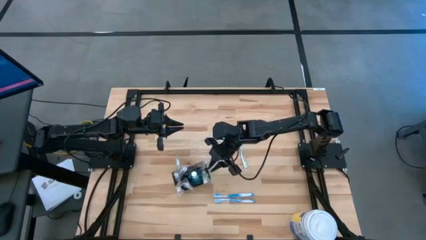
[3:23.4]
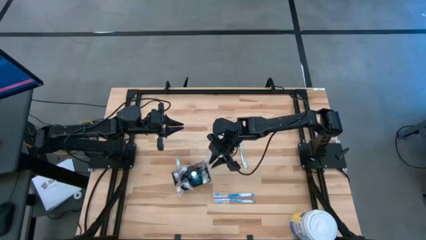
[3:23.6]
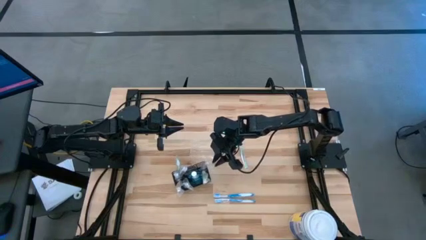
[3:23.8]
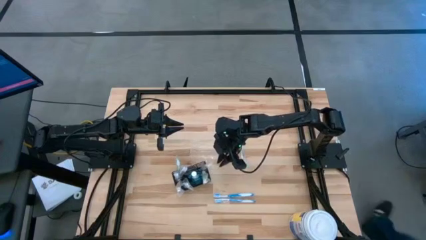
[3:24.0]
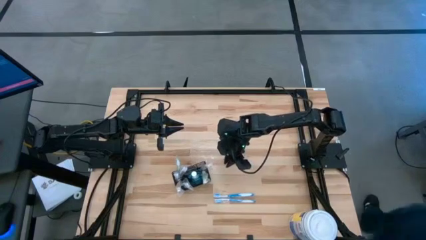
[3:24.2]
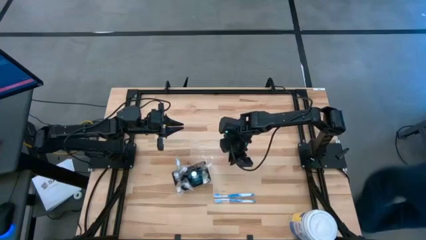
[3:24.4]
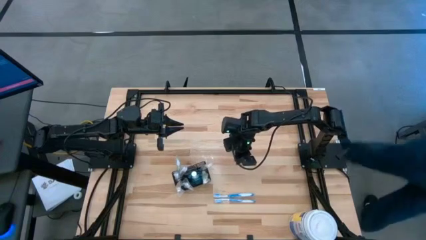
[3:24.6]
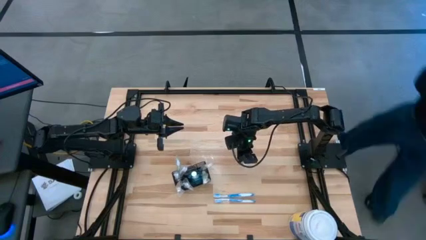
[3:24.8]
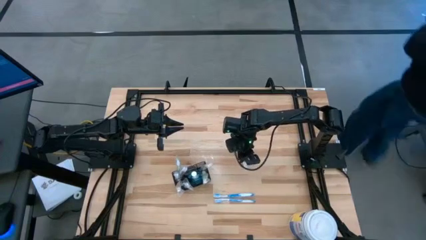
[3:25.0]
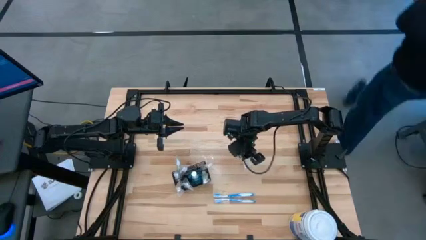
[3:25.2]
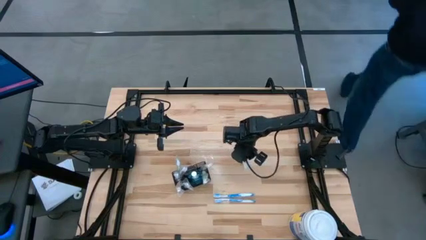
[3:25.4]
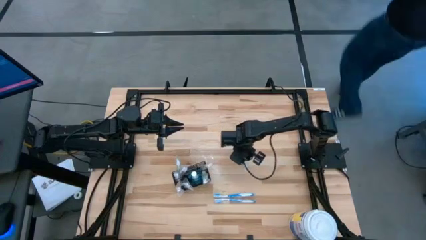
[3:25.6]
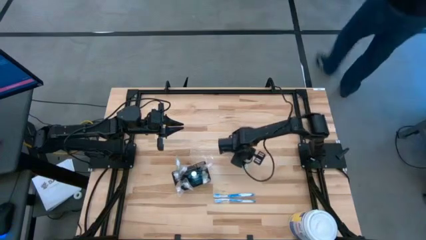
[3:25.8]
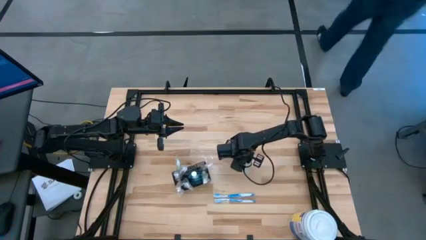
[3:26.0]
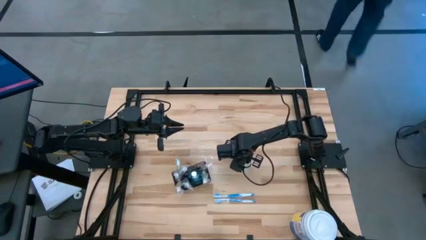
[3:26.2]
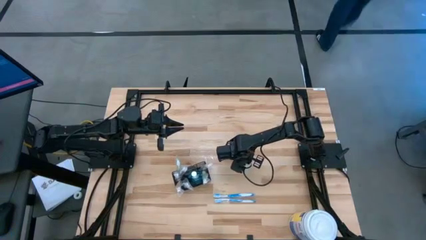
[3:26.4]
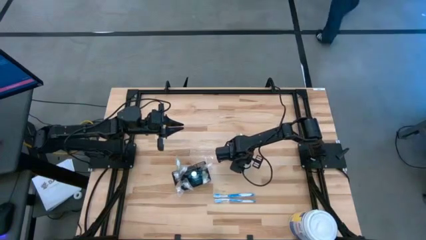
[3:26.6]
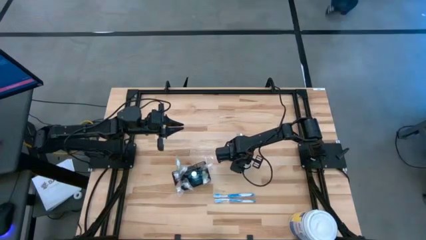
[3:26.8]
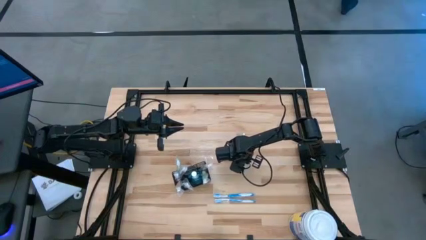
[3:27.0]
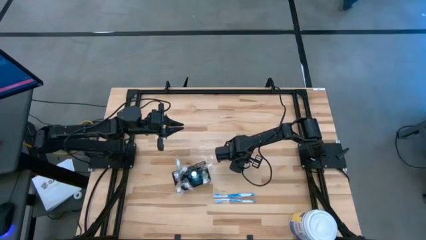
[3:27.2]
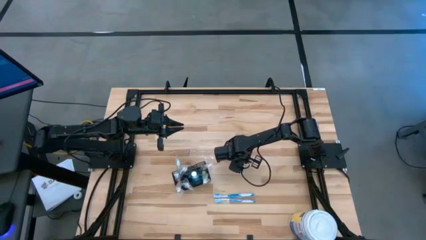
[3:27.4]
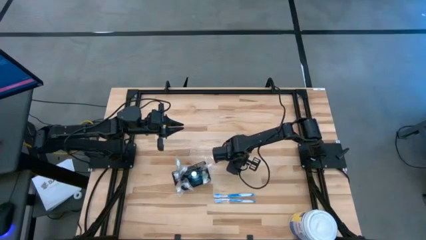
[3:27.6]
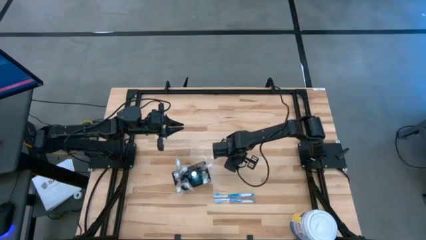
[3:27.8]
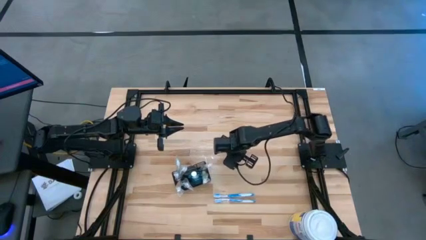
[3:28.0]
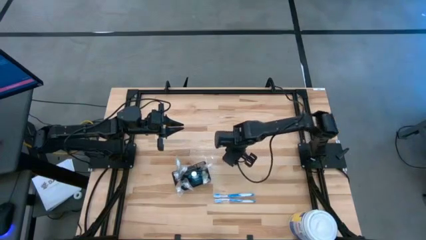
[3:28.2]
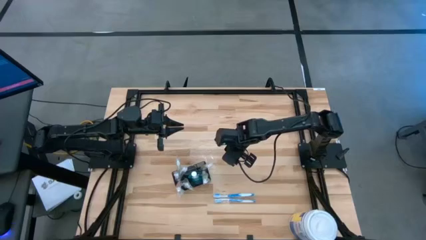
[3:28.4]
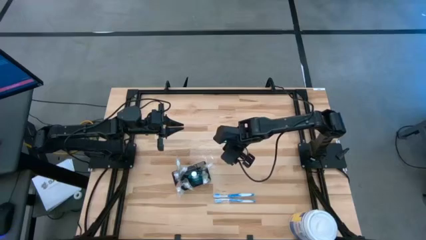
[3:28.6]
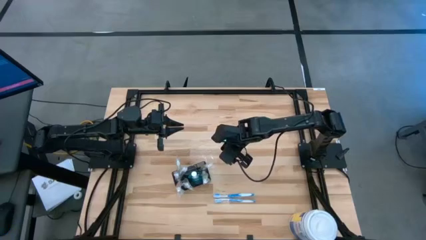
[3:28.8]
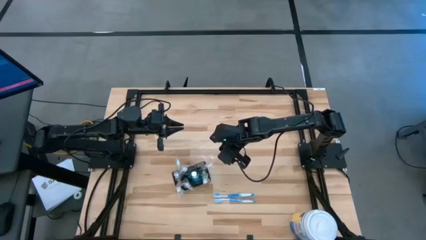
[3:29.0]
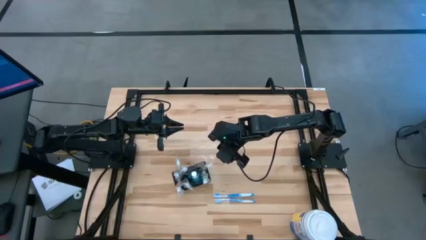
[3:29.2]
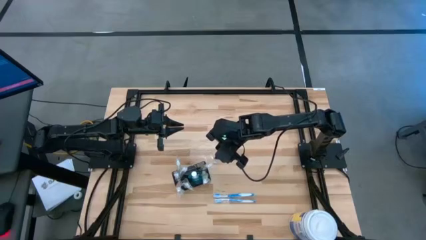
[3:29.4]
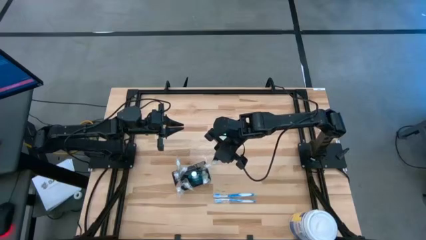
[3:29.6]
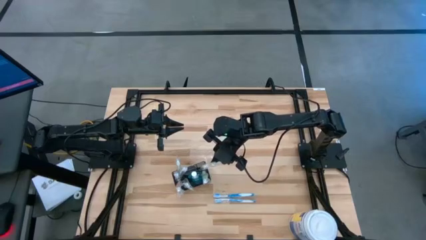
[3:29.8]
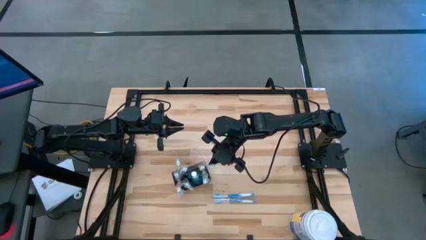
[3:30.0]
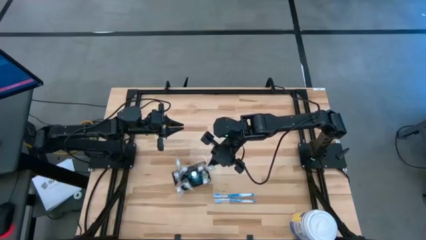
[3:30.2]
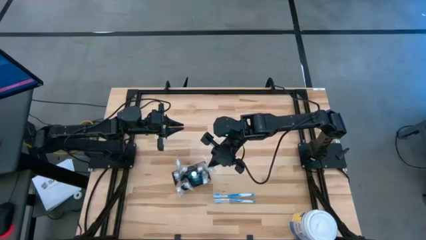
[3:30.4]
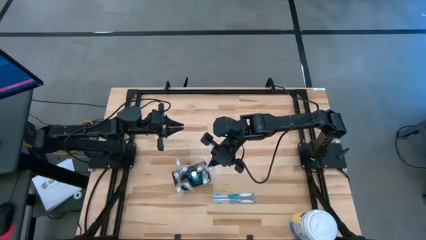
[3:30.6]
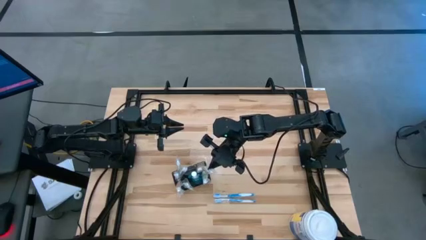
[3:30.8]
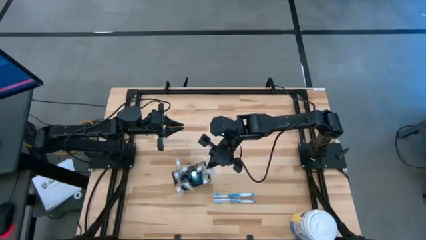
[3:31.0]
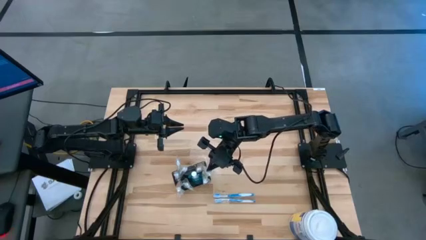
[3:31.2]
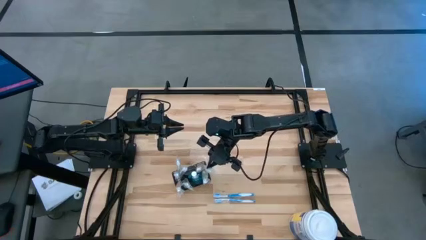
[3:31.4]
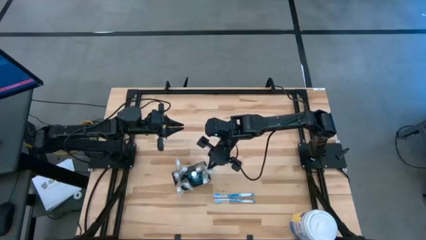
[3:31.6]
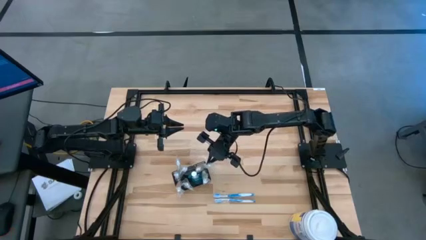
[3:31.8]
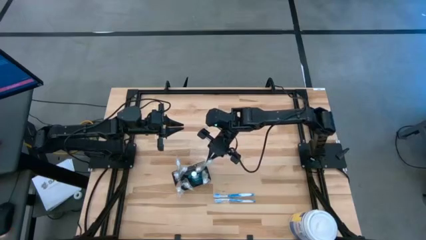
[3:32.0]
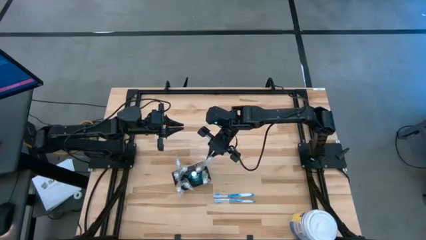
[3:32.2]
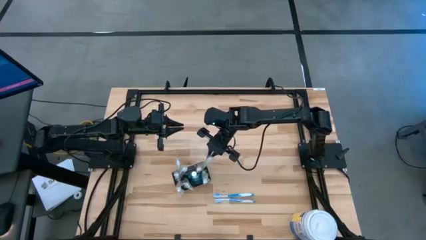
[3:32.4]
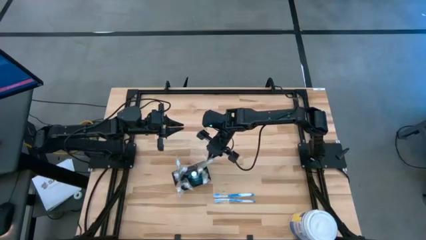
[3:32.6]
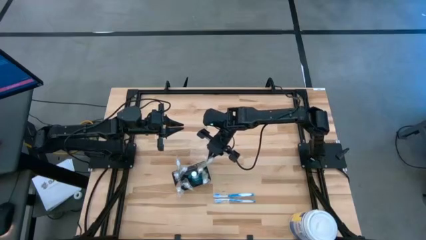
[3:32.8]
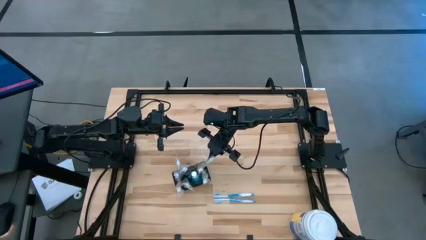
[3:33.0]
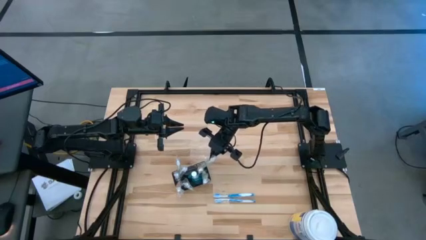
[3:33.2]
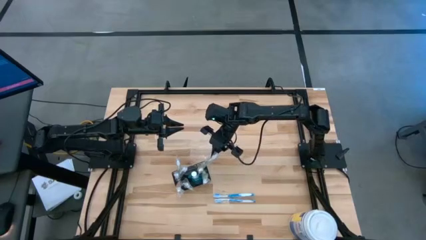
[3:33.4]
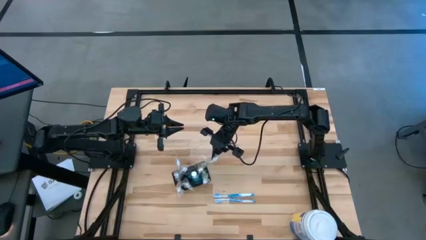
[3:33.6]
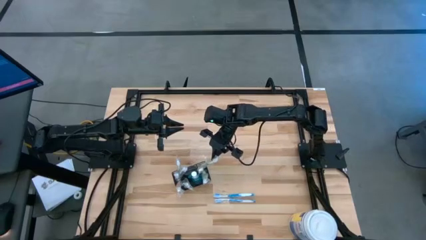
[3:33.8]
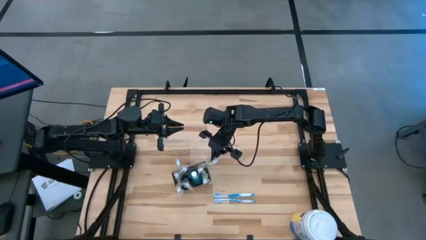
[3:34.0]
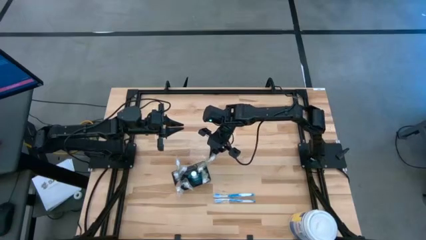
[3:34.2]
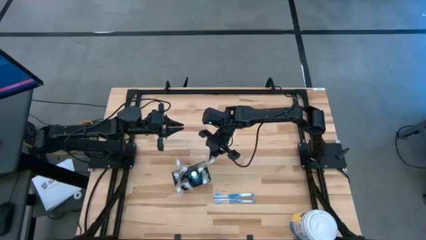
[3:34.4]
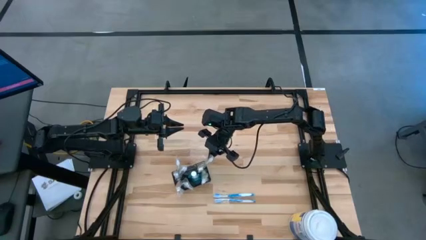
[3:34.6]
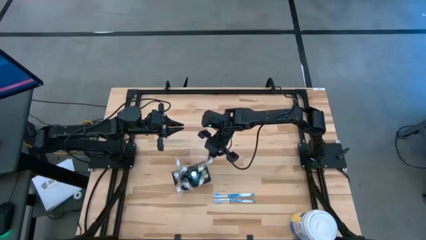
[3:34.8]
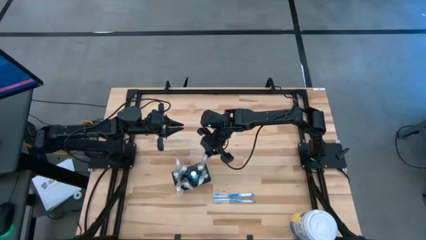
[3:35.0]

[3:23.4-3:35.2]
Task: Pick & Place toothbrushing station
Put the white green toothbrush into the black toothbrush rack

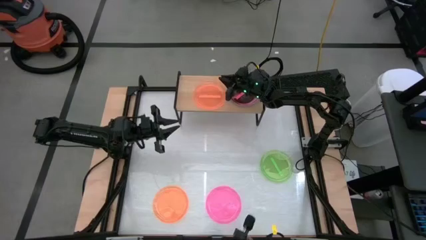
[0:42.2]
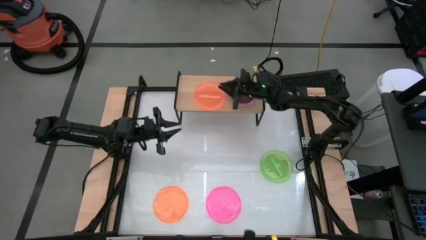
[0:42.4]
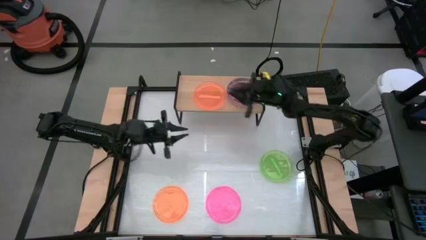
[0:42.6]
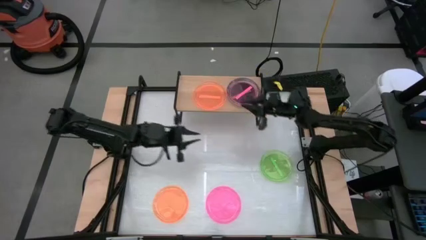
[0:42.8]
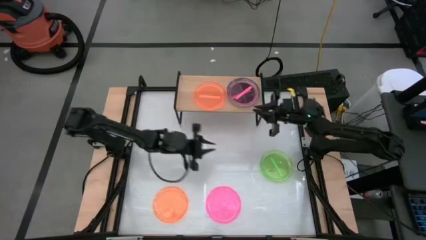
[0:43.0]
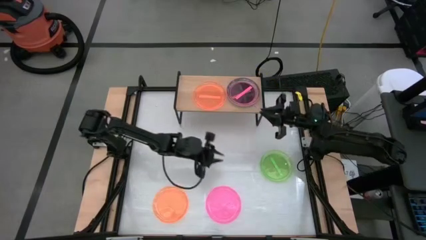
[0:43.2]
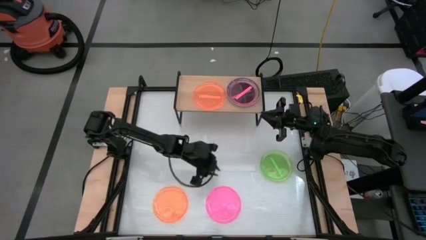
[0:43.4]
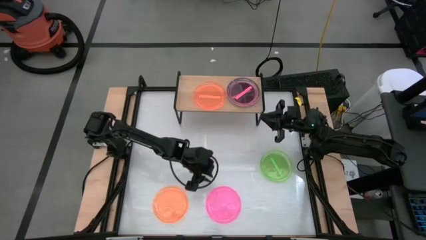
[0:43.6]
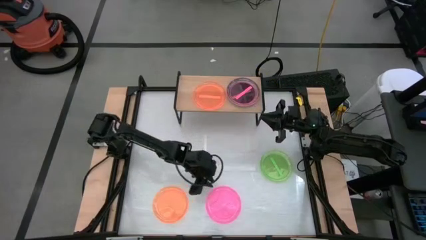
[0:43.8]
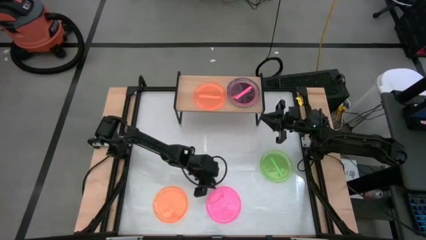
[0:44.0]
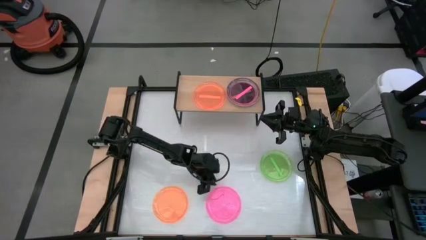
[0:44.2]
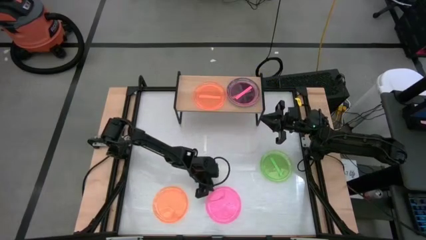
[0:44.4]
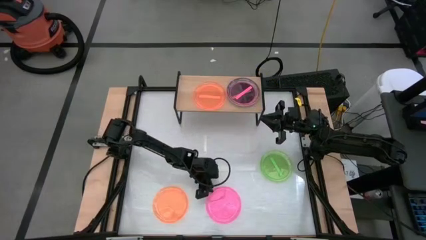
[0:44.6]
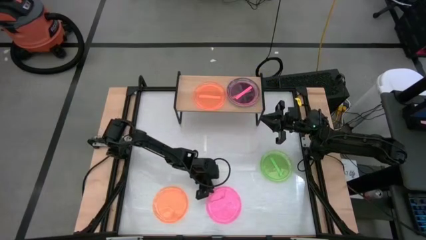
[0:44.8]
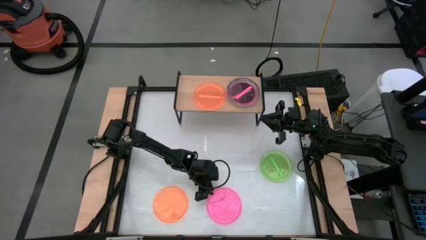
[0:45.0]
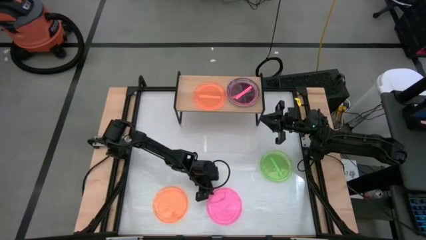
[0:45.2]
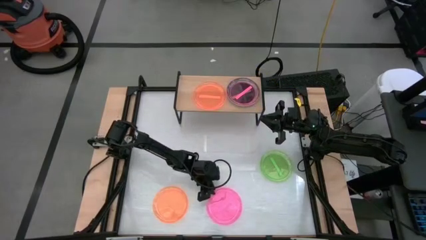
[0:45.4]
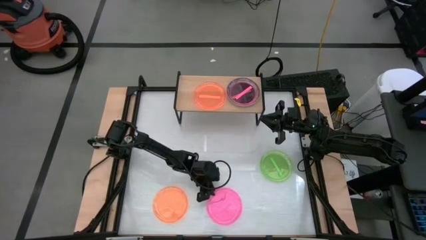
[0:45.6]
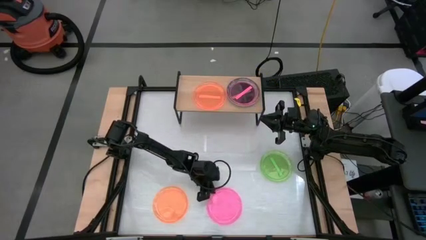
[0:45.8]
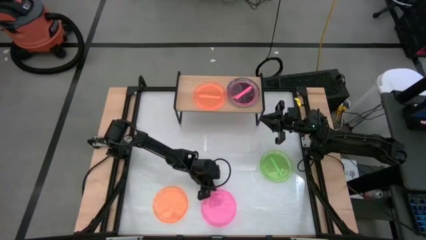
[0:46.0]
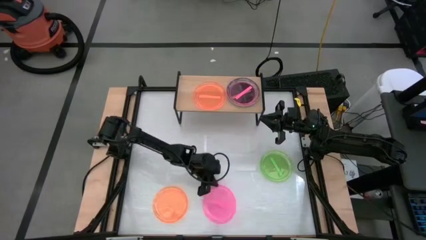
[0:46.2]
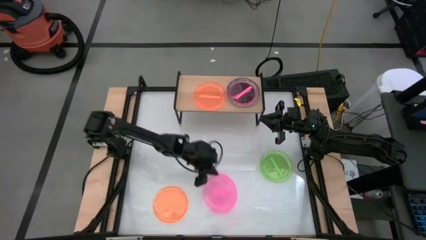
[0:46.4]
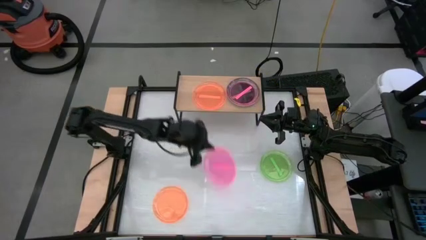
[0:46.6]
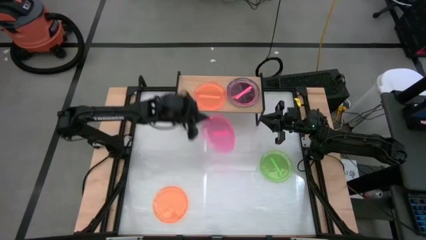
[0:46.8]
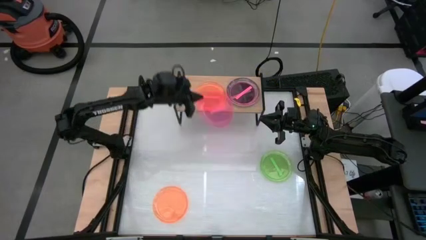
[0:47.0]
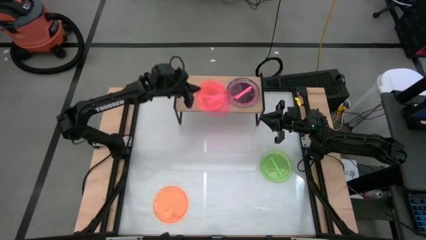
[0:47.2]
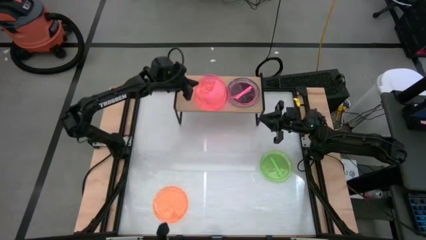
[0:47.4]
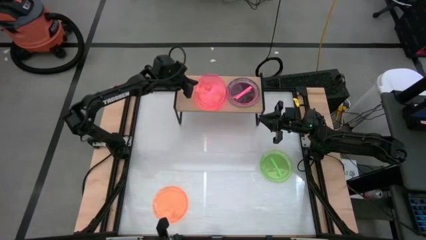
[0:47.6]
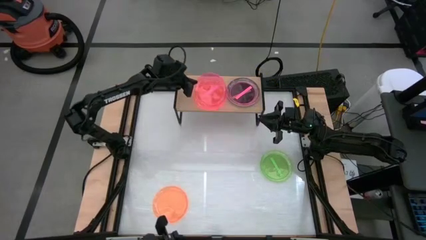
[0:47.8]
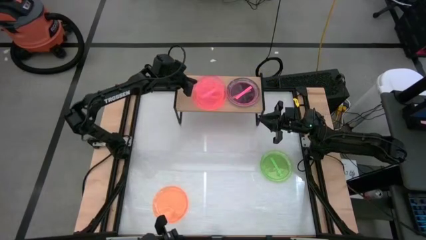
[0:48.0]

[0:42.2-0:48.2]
Task: Place and stack plates onto a shelf
Stack the pink plate on the orange plate on the shelf
